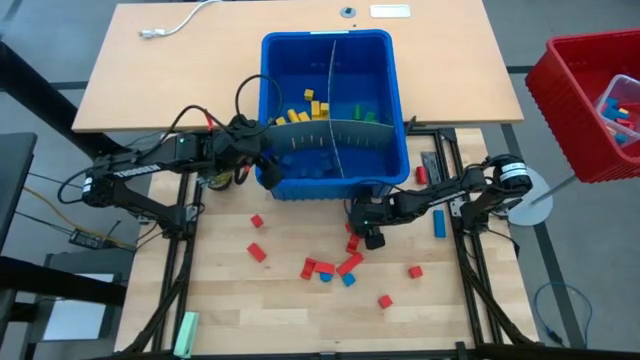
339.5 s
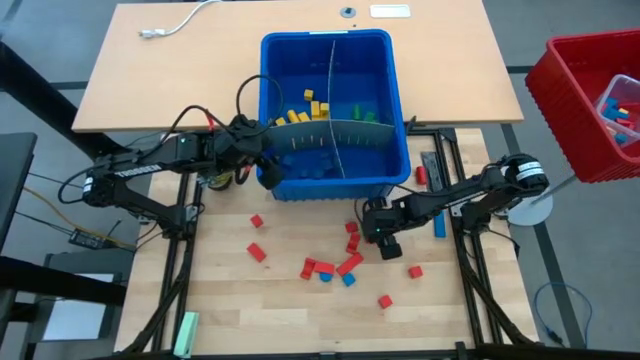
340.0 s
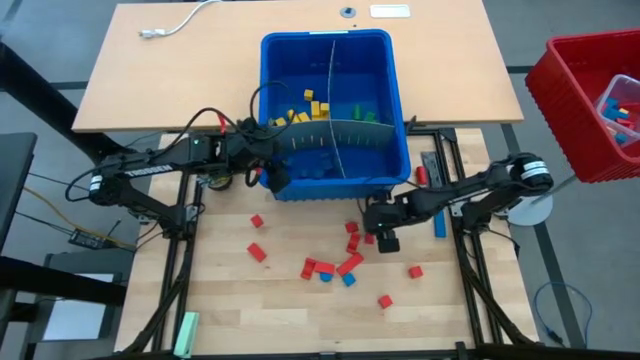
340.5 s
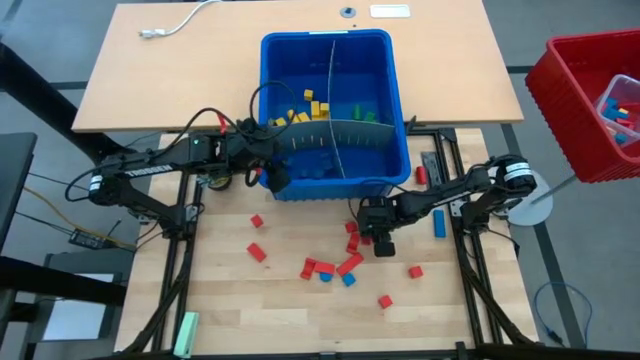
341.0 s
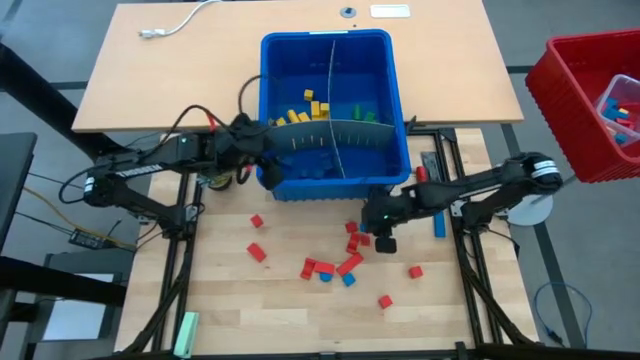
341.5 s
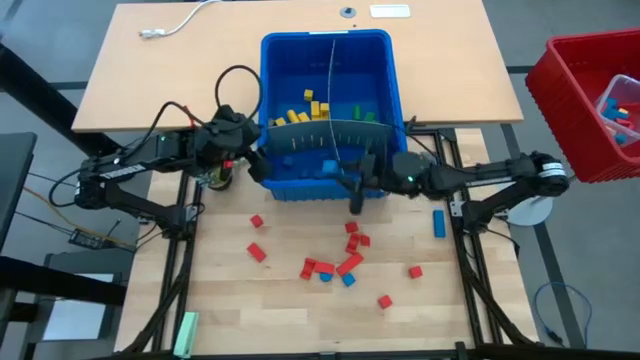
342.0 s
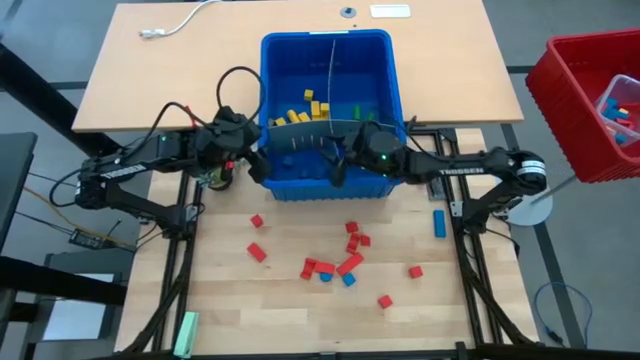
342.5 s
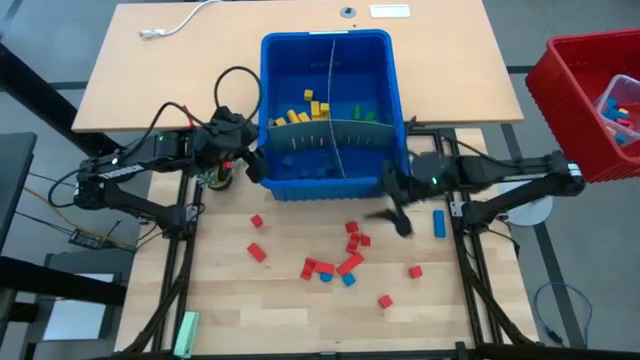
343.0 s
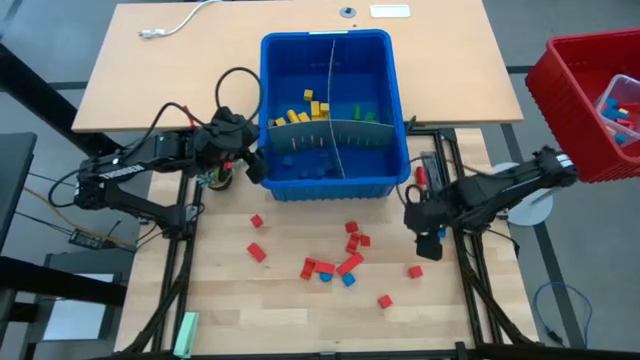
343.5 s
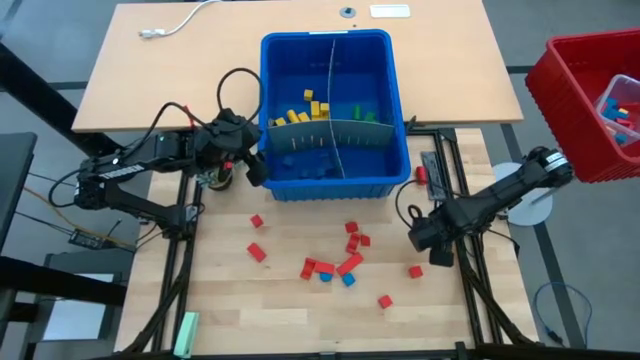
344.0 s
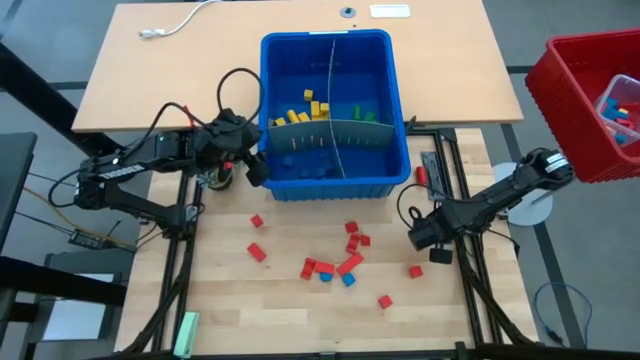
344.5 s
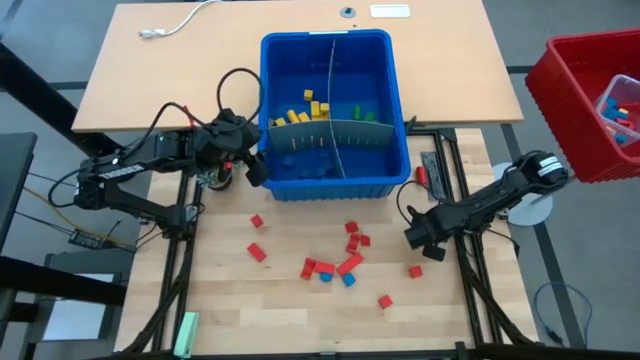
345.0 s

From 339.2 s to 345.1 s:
Task: Sort blocks
Put the blue block with the other blue blocks into the blue bin

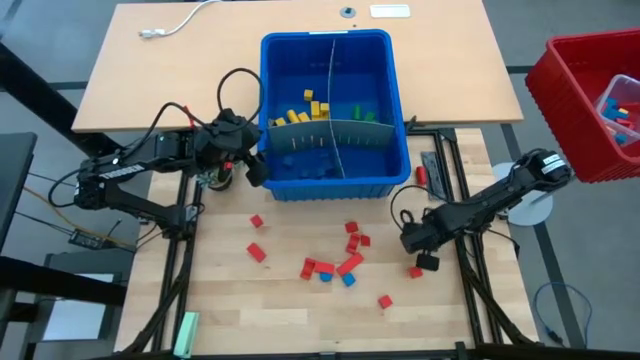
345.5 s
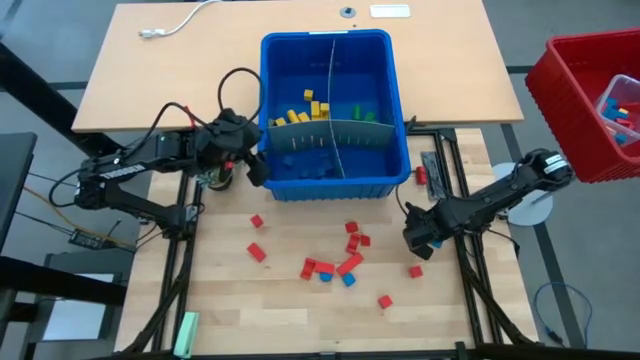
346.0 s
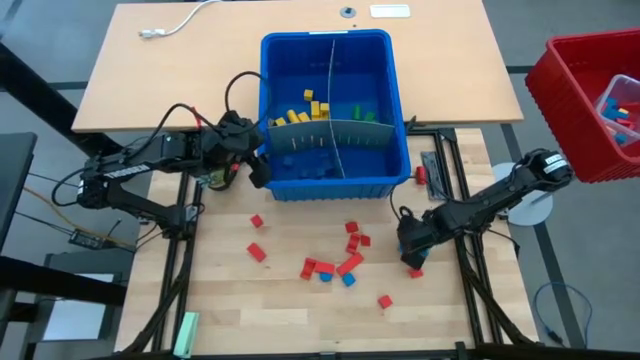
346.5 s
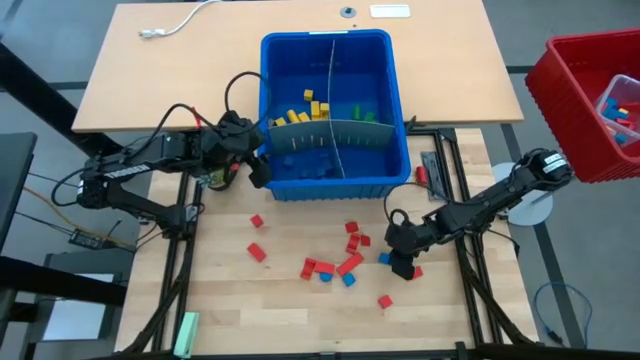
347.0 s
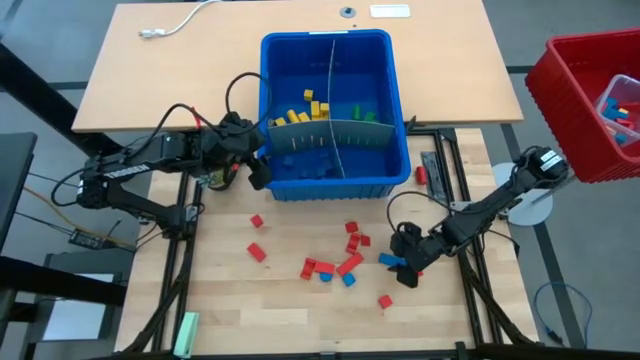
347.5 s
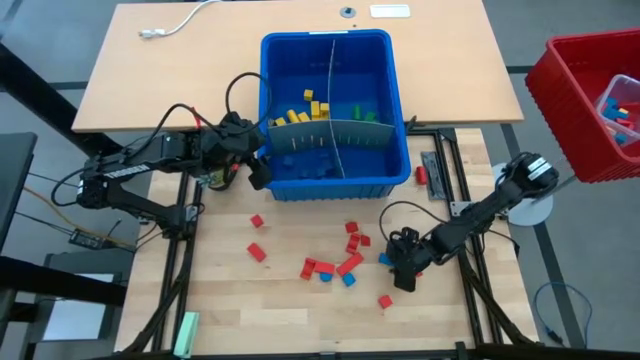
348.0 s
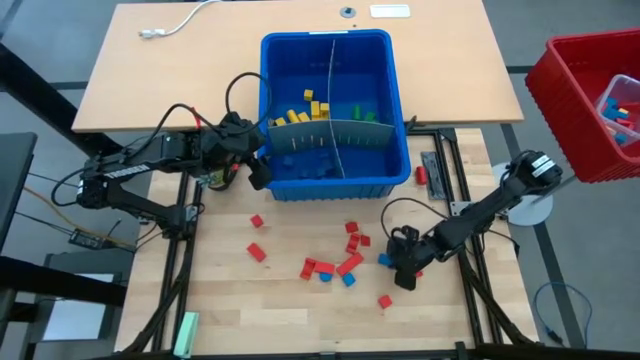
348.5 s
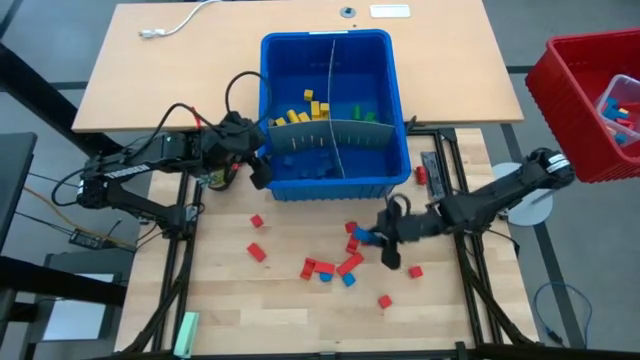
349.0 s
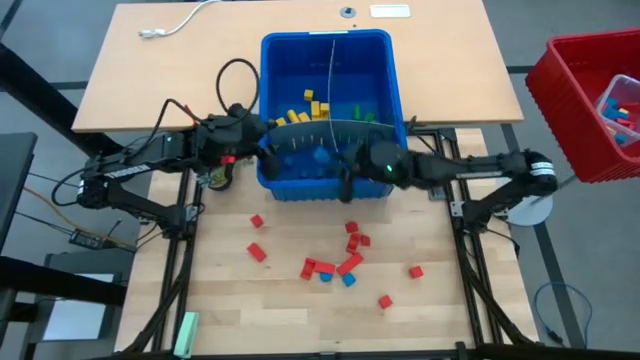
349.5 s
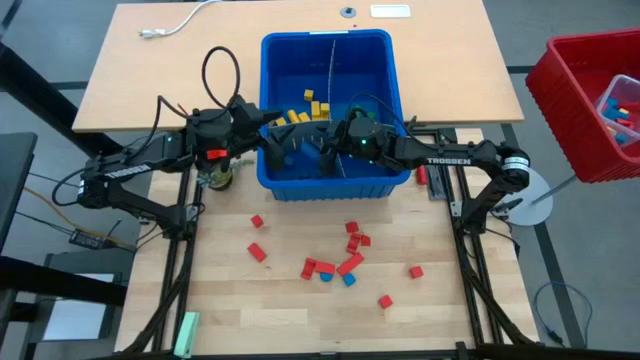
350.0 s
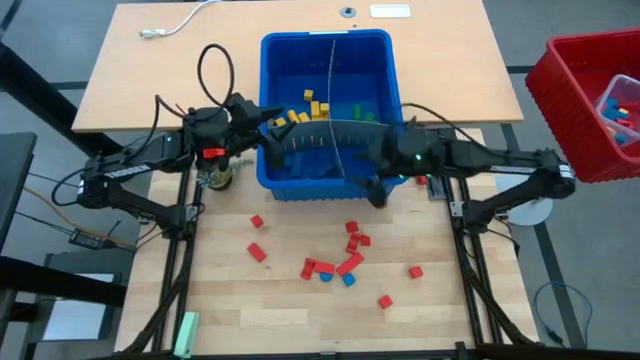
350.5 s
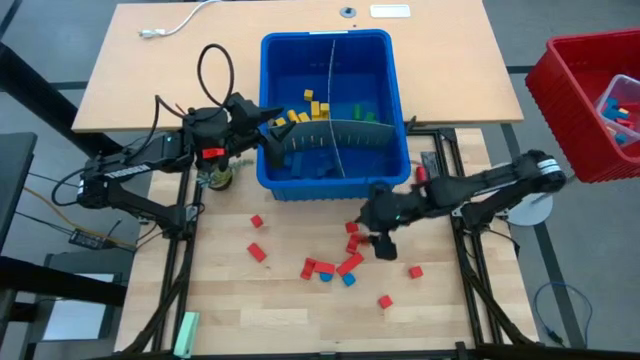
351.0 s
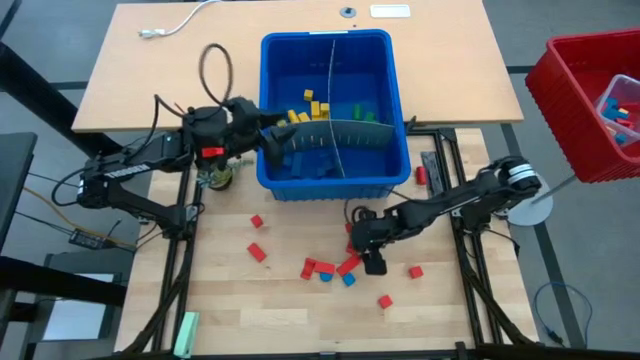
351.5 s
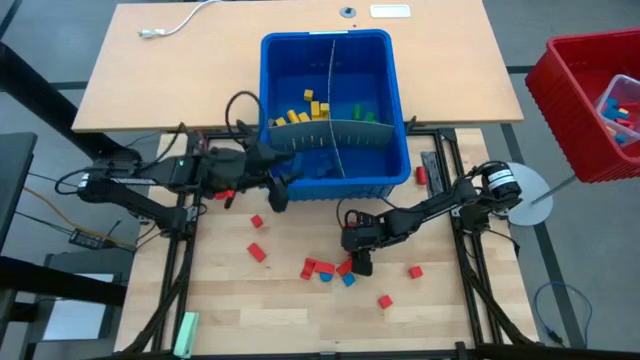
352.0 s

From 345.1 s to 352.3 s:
Put the blue block with the other blue blocks into the blue bin

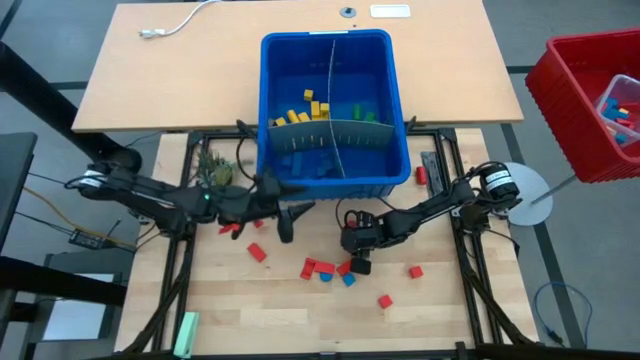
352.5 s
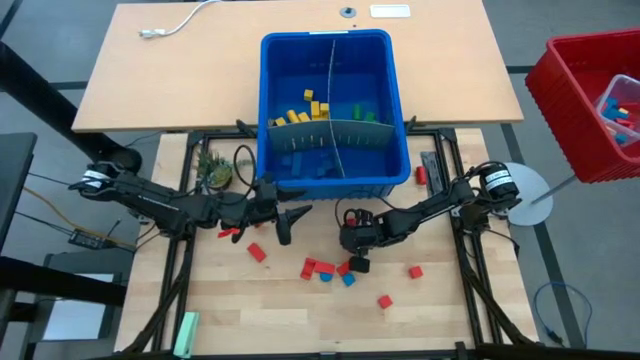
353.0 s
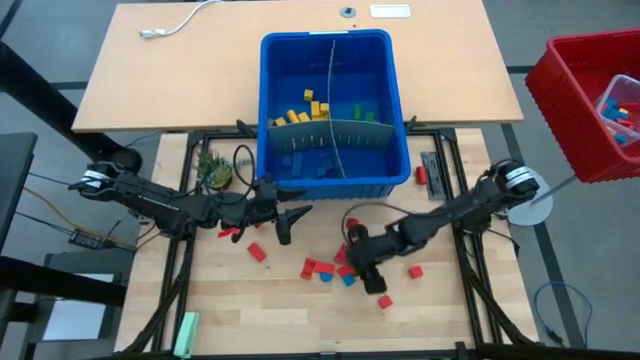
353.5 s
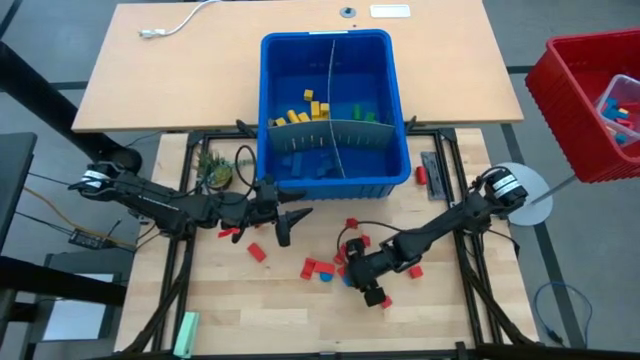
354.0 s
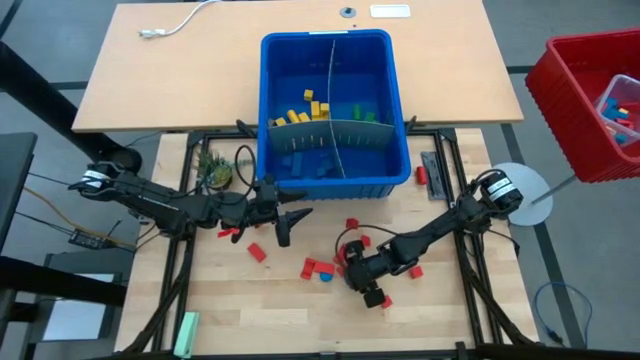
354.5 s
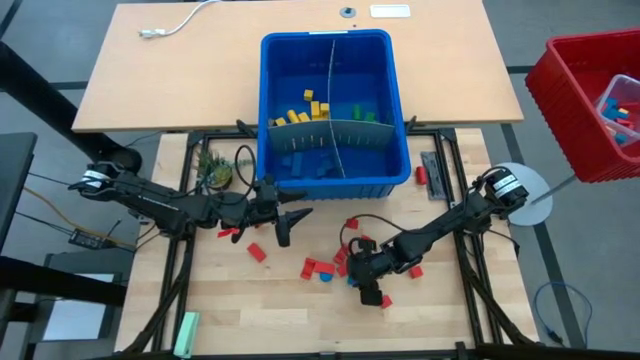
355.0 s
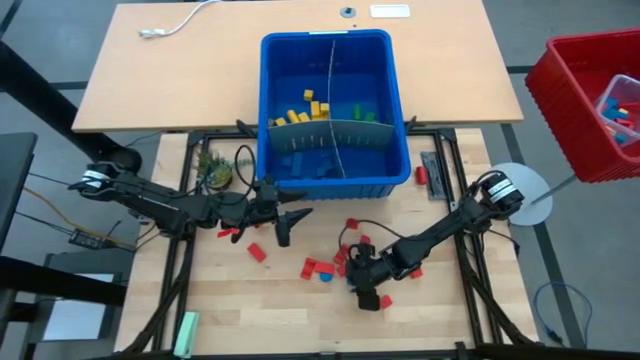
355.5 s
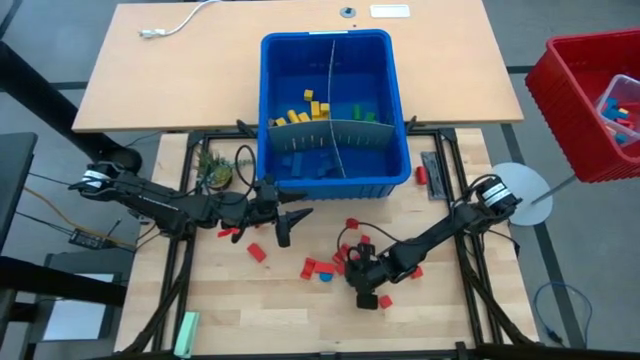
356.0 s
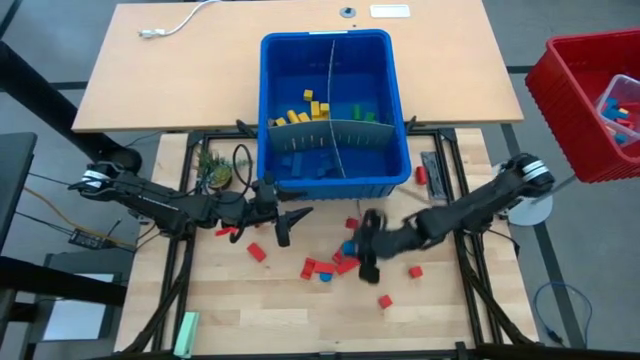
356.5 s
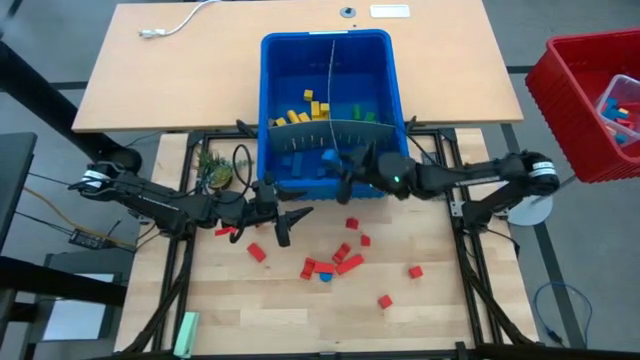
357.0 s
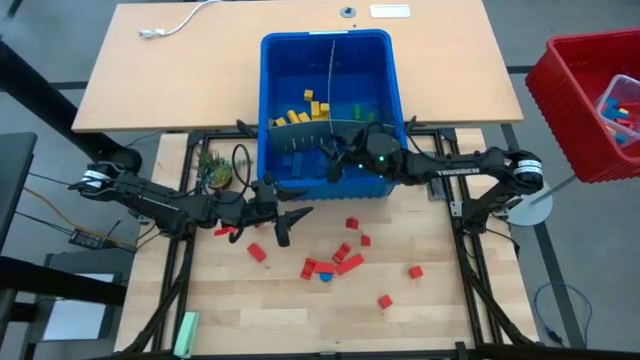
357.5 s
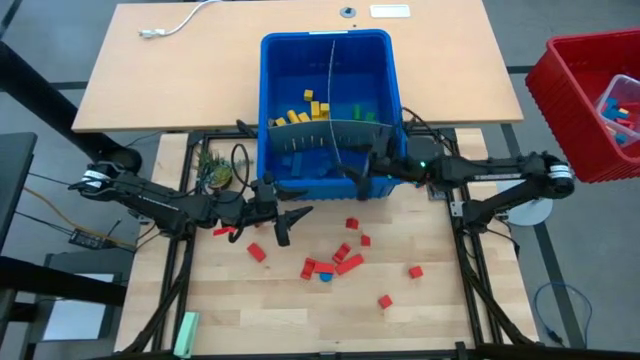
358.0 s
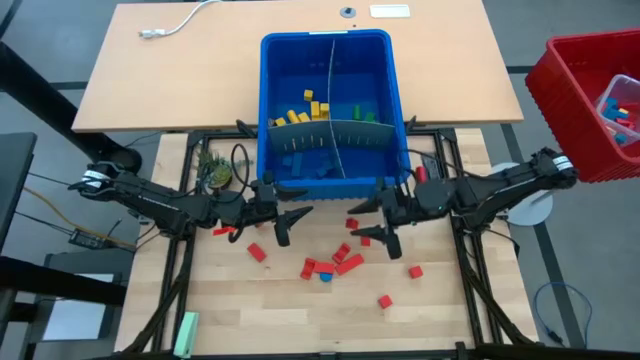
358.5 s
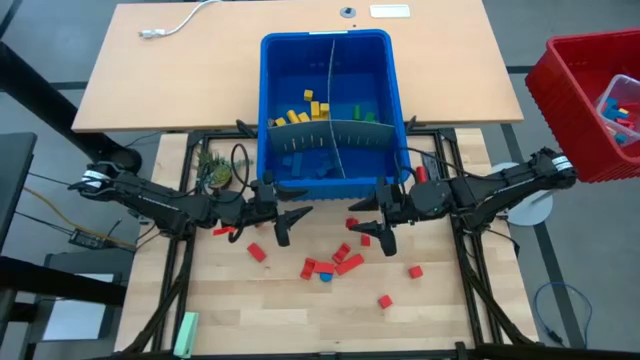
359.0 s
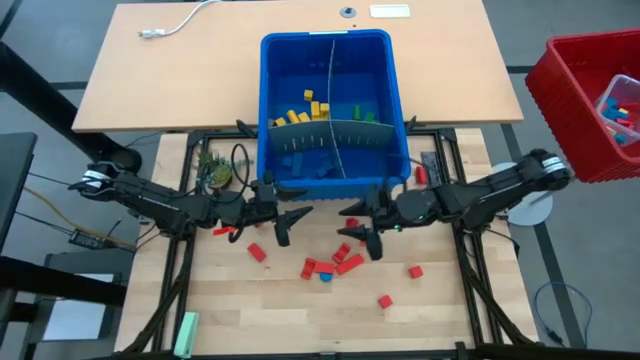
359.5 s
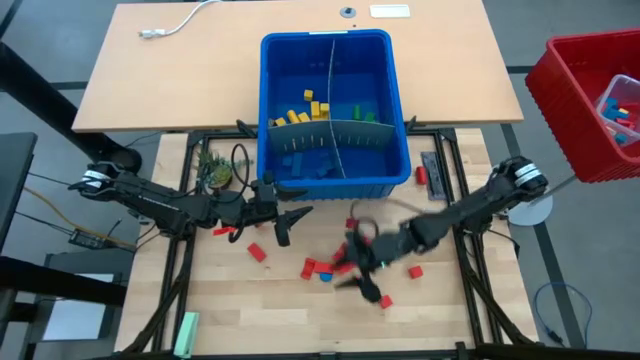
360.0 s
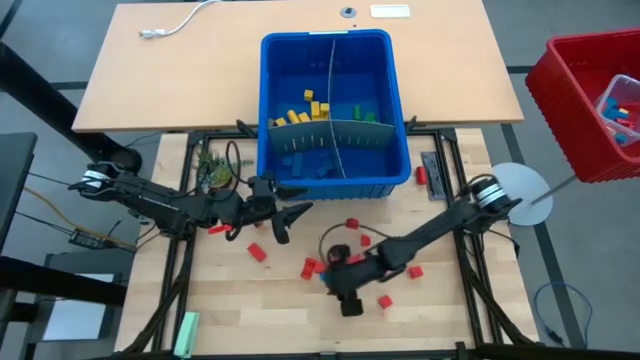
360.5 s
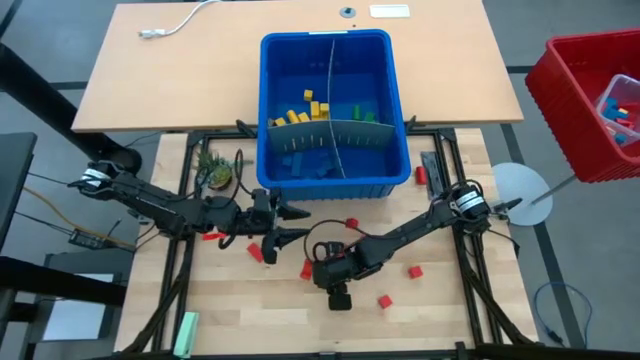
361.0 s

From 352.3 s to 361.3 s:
Put the blue block with the other blue blocks into the blue bin
